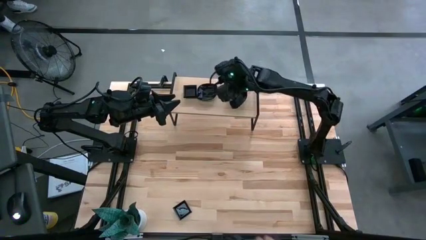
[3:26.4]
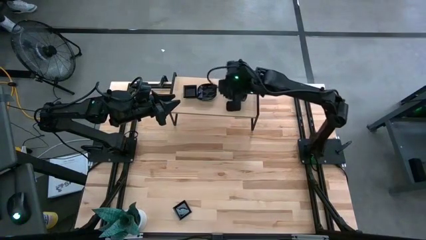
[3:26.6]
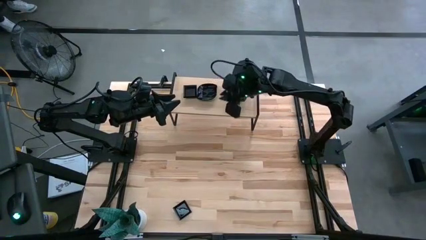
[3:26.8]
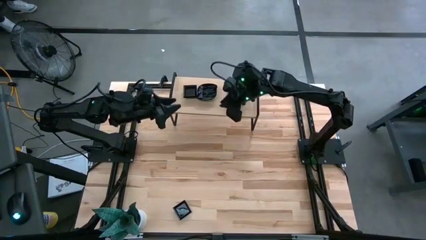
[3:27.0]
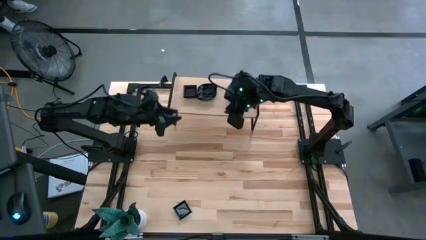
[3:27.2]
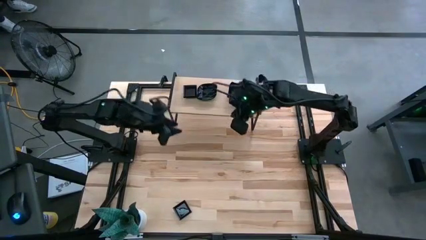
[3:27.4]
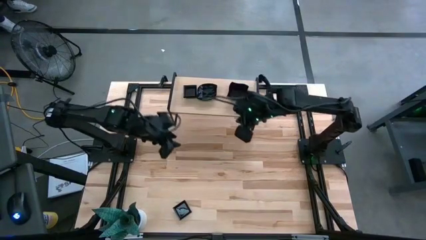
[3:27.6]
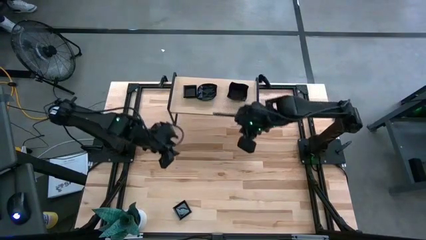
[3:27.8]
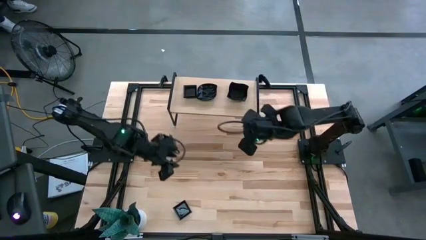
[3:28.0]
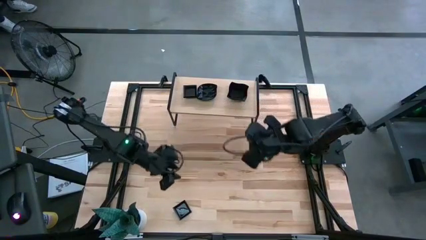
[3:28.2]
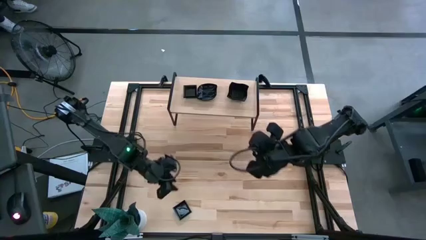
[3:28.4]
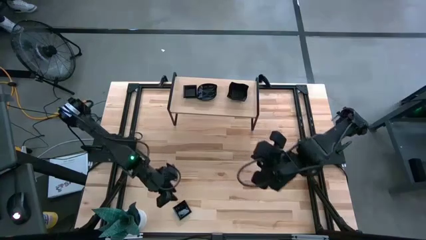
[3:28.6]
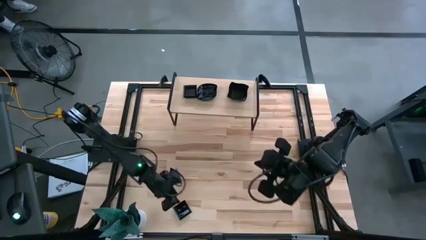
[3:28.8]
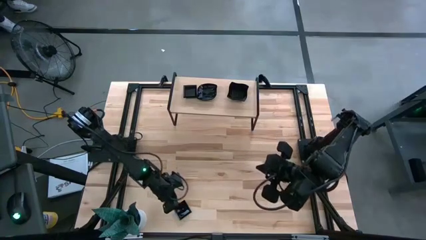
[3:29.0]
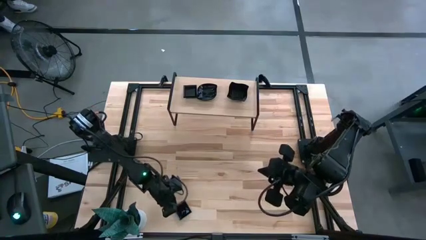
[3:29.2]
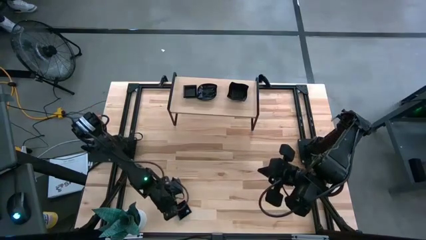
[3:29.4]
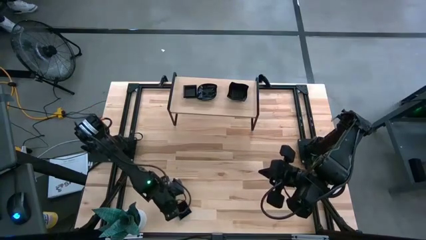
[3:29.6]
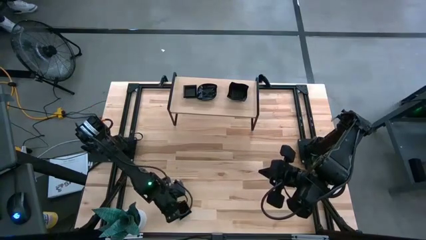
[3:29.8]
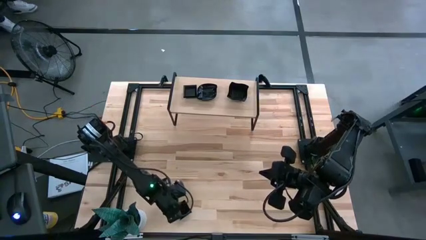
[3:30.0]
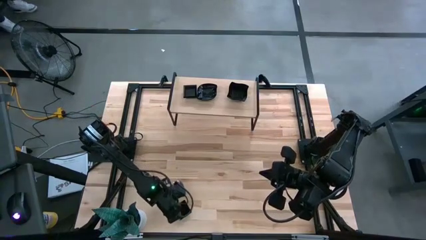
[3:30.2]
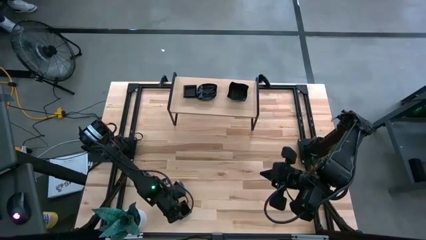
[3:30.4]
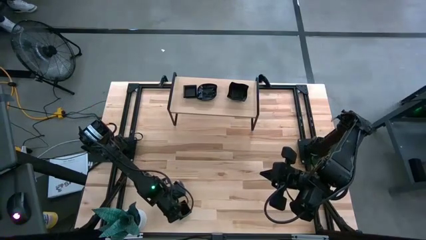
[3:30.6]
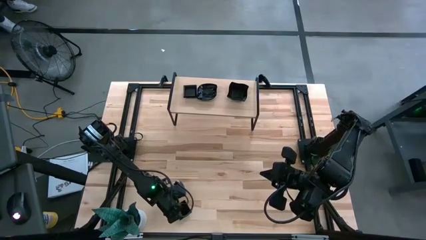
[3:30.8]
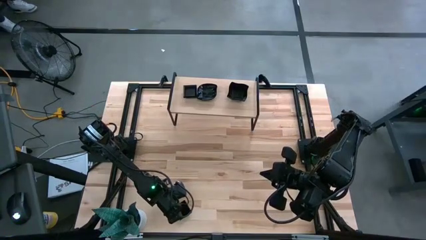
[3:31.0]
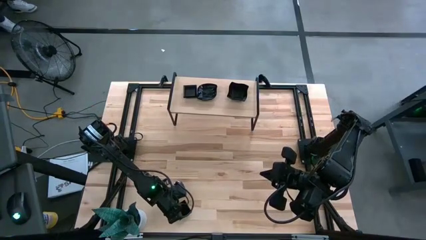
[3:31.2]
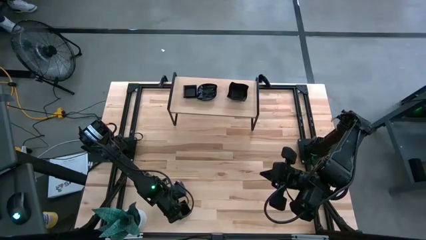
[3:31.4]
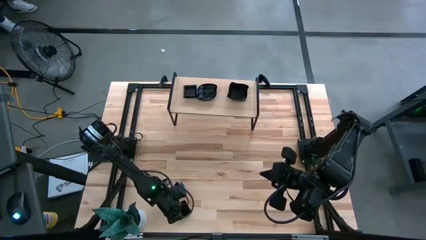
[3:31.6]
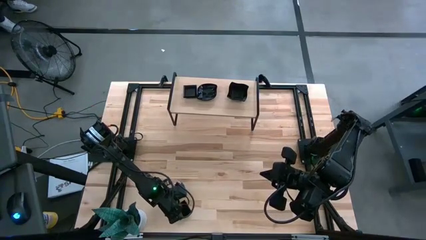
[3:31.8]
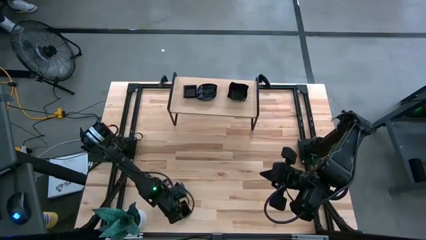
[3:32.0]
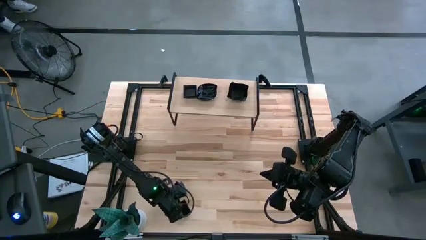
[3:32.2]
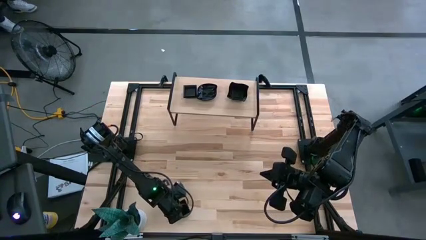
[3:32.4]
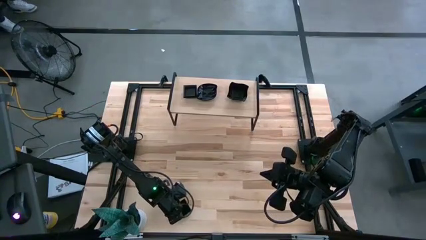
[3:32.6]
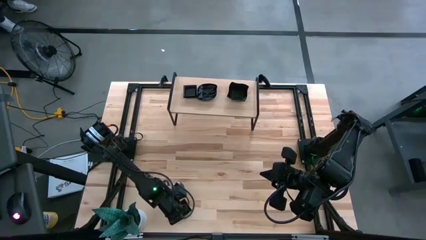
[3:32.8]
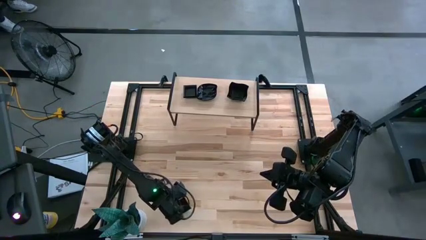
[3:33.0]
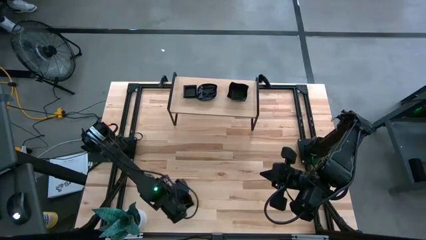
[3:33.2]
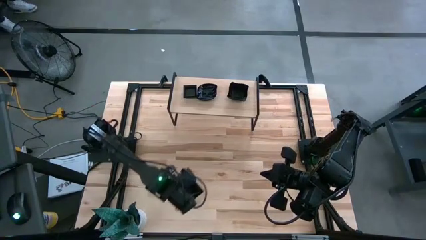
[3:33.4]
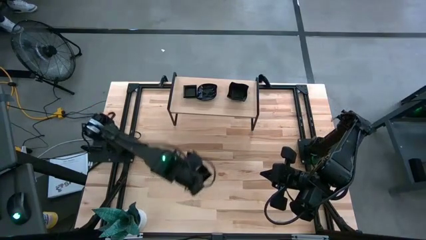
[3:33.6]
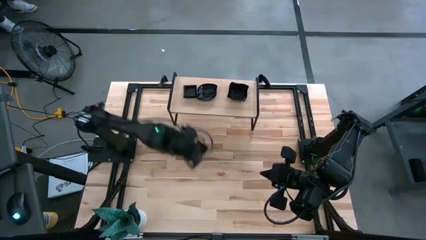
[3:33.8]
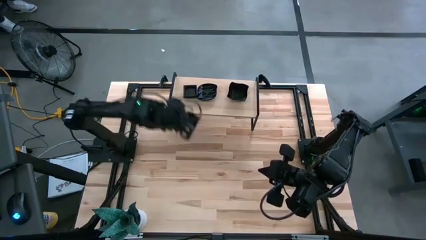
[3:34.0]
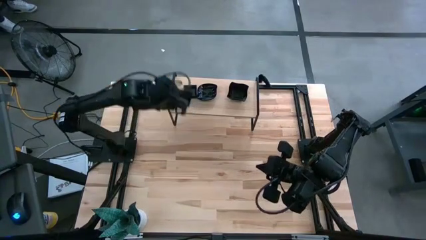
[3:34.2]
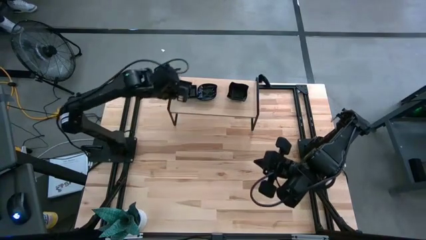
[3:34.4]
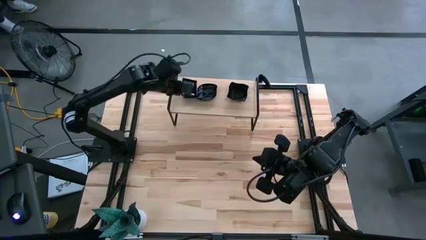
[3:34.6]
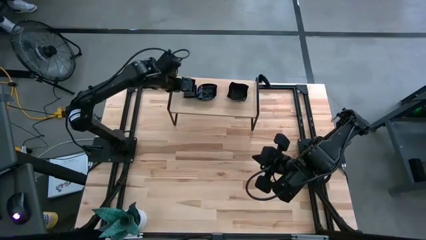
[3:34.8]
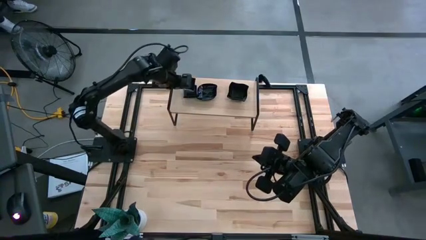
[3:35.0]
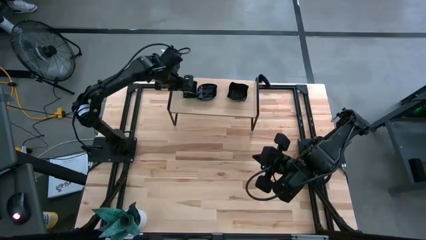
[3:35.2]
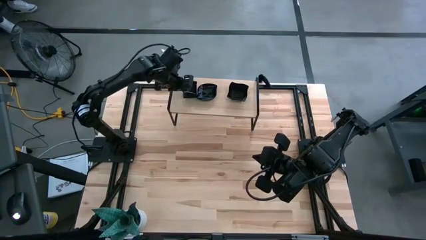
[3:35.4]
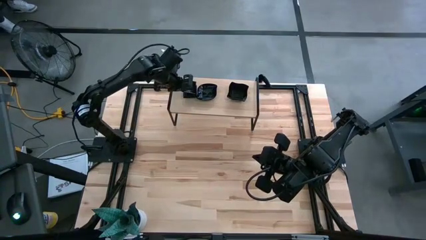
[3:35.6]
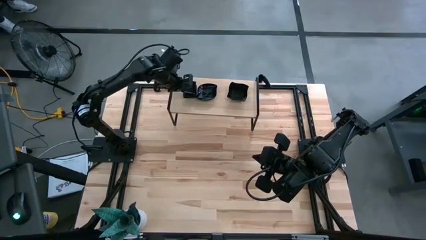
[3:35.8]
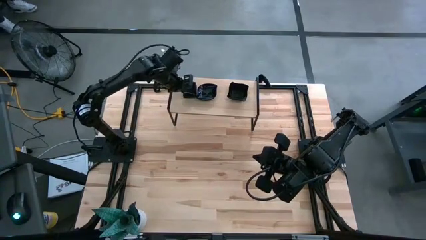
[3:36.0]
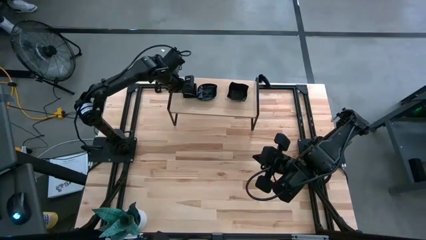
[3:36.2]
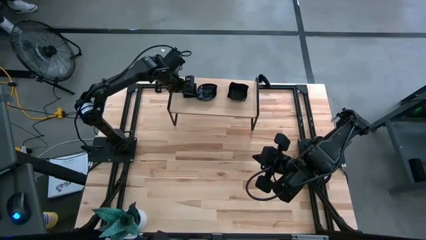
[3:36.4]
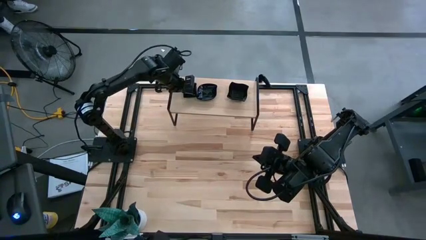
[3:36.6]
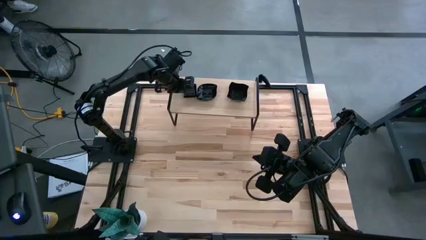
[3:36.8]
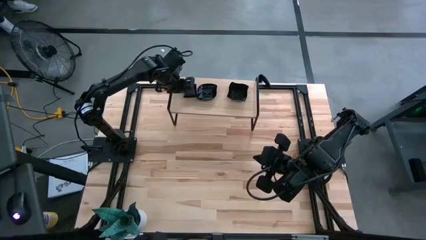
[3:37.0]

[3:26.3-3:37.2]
Task: Pick & Place Mini shaped plates
Stack the square-shaped plate on the square-shaped plate

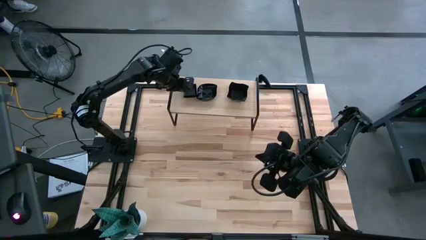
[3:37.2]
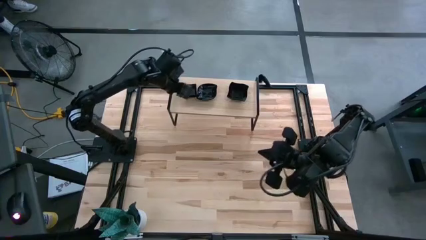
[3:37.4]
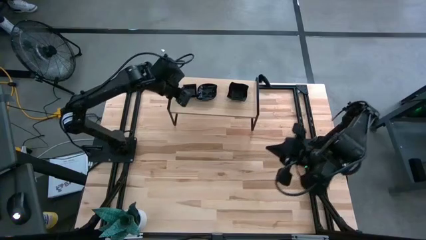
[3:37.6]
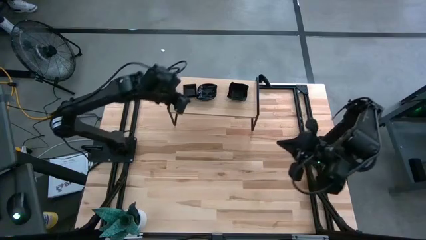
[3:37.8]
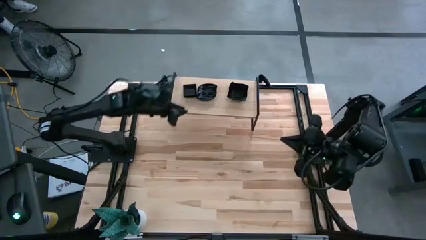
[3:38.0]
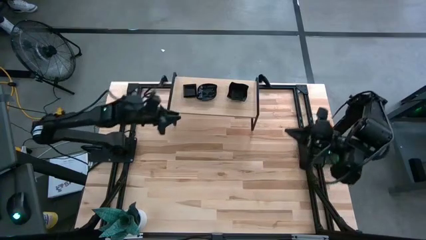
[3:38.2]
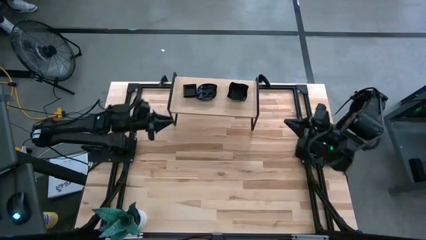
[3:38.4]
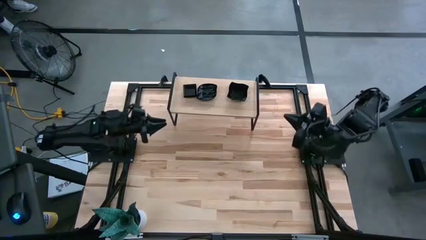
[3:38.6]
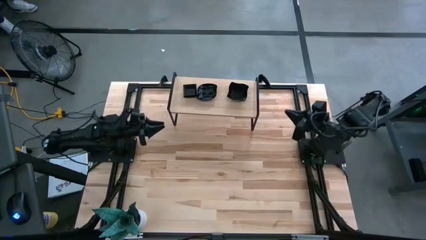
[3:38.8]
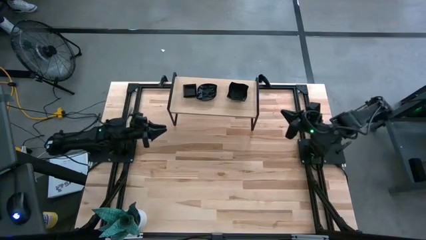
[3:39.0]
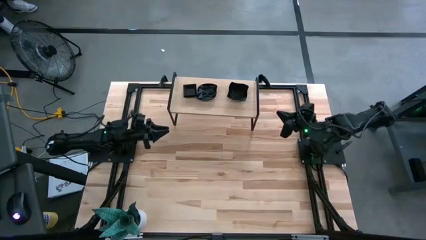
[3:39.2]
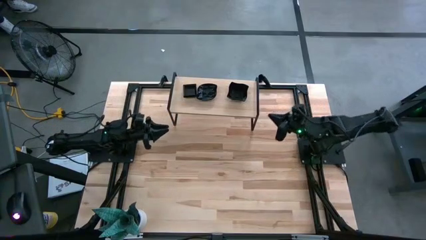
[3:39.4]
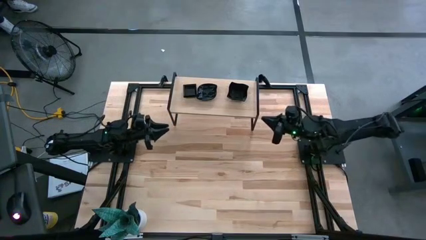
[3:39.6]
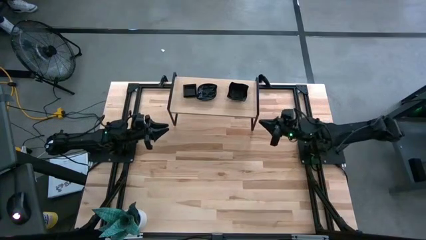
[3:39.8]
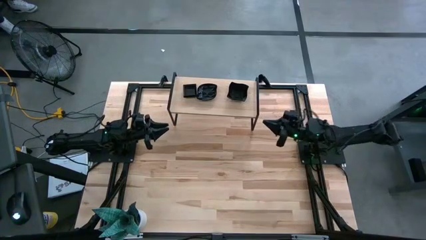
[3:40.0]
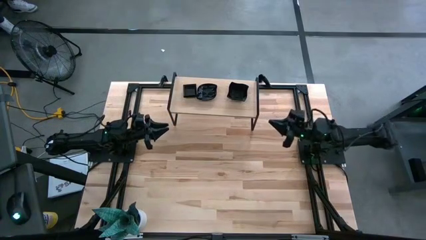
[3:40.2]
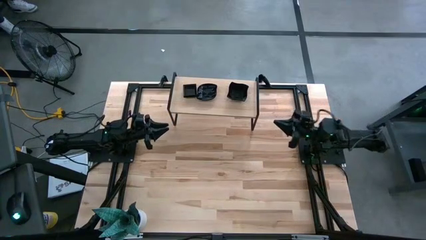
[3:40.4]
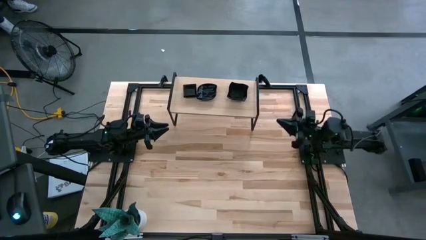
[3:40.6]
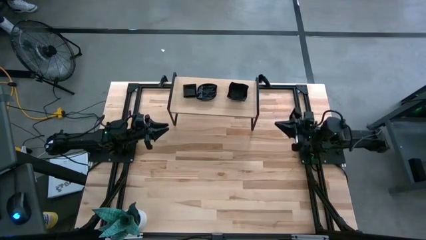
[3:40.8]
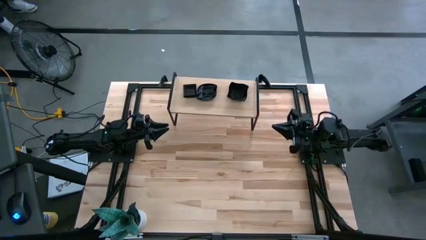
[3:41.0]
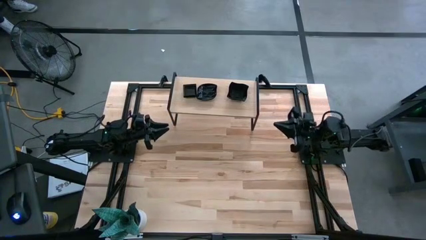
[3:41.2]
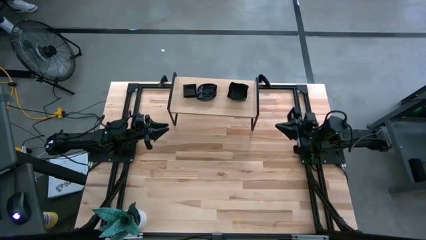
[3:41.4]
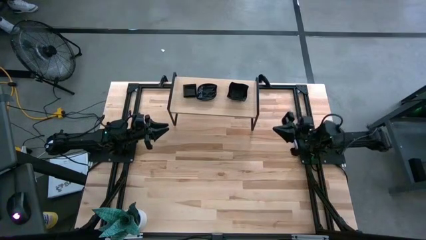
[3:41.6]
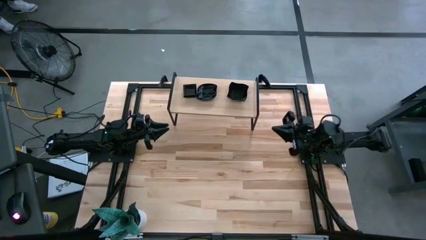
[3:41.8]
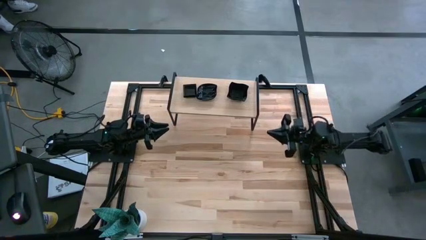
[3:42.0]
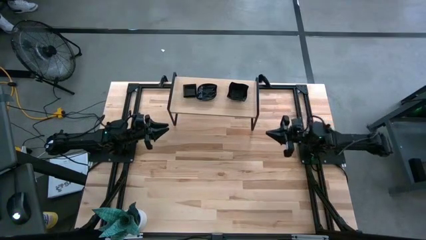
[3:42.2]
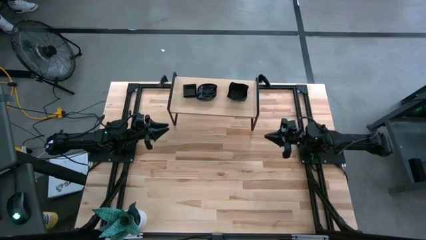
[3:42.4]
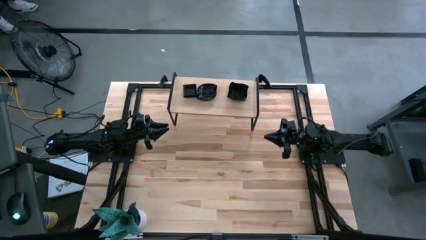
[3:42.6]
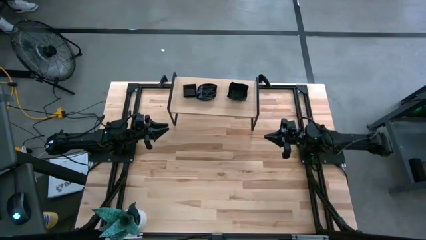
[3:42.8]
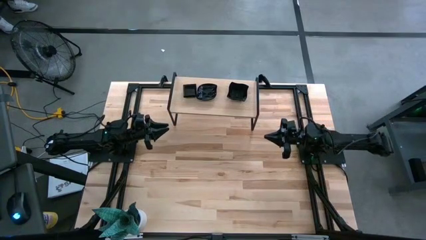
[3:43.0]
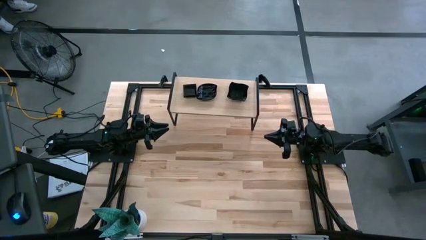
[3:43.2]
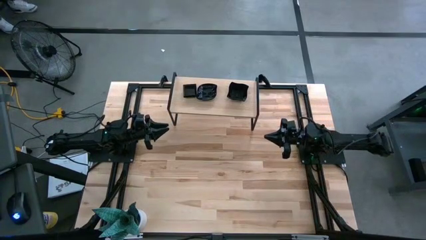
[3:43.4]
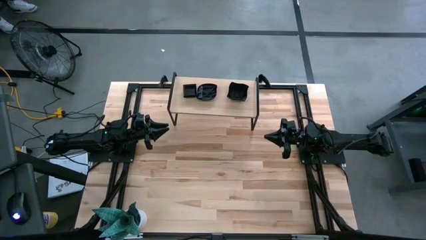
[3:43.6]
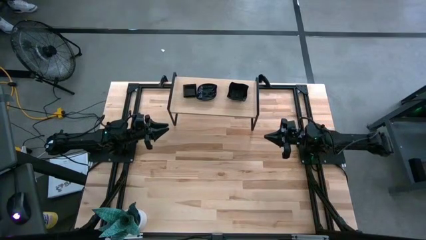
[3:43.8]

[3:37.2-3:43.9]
Return to Home Position
